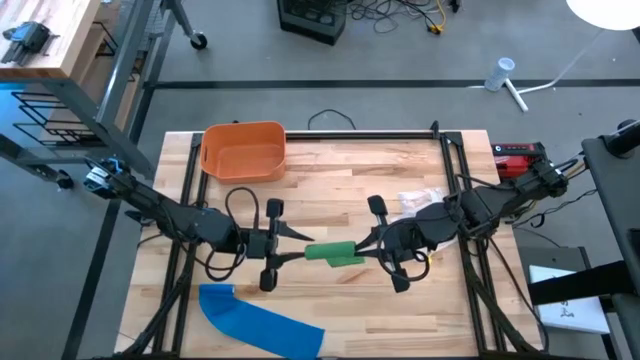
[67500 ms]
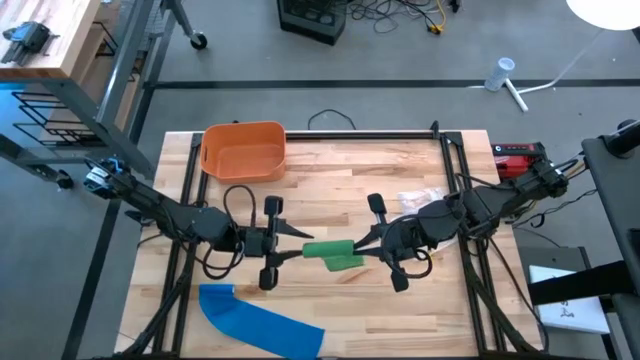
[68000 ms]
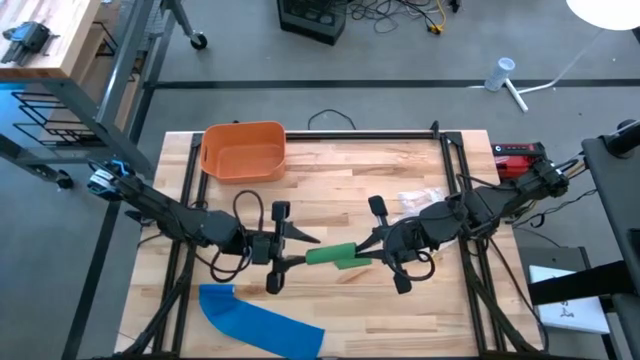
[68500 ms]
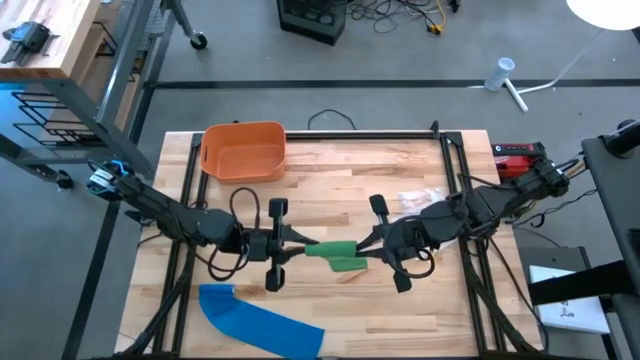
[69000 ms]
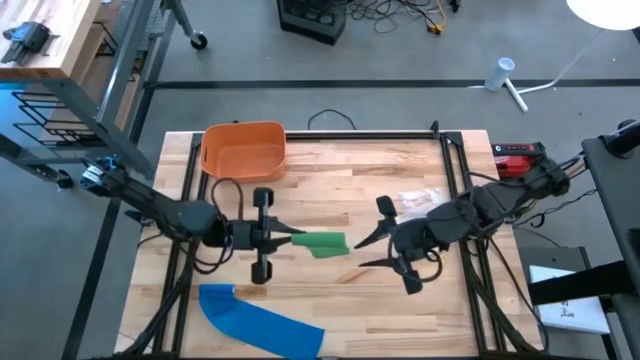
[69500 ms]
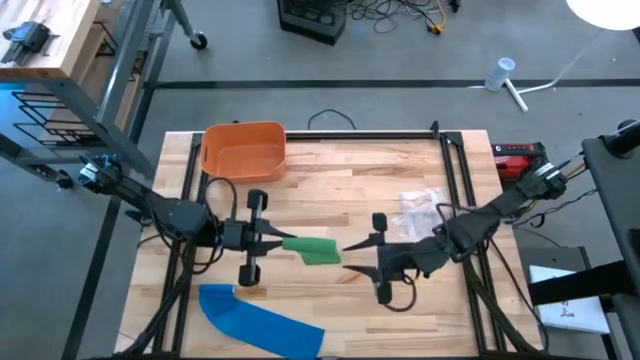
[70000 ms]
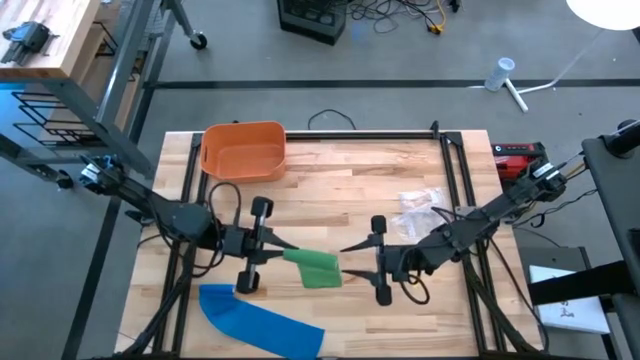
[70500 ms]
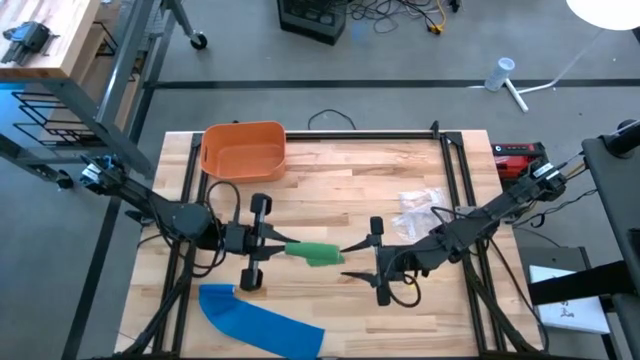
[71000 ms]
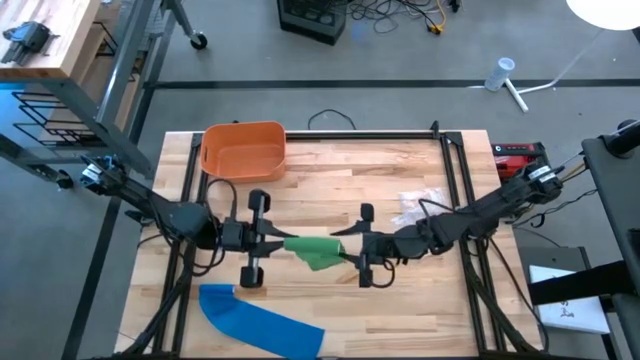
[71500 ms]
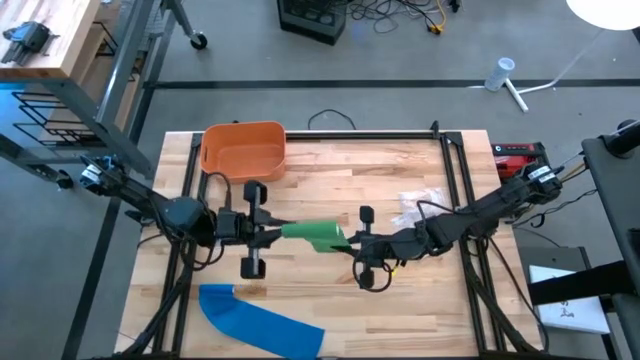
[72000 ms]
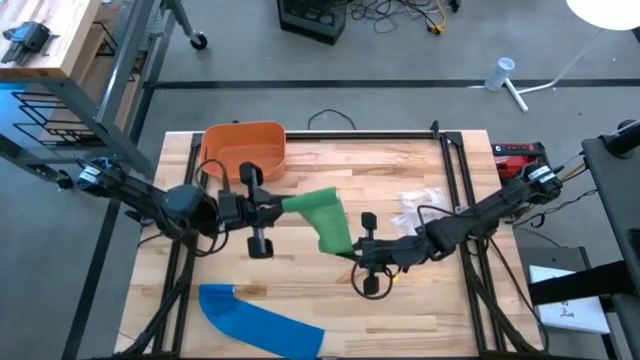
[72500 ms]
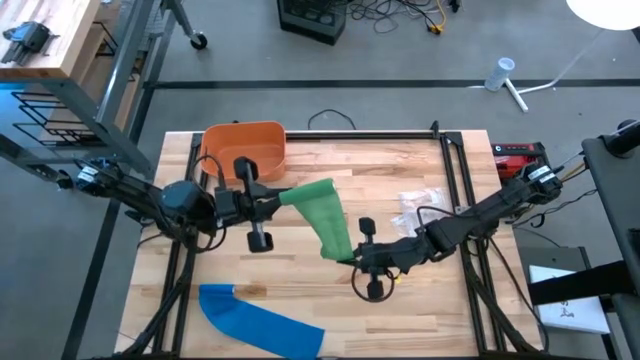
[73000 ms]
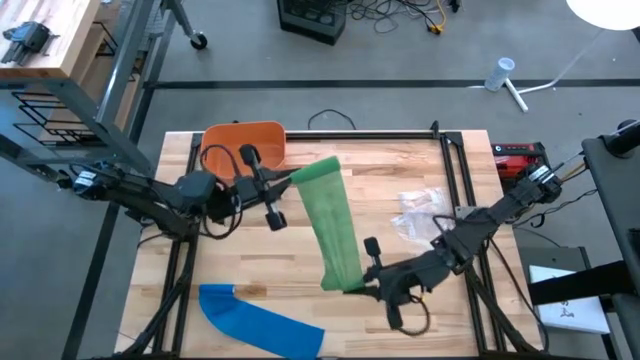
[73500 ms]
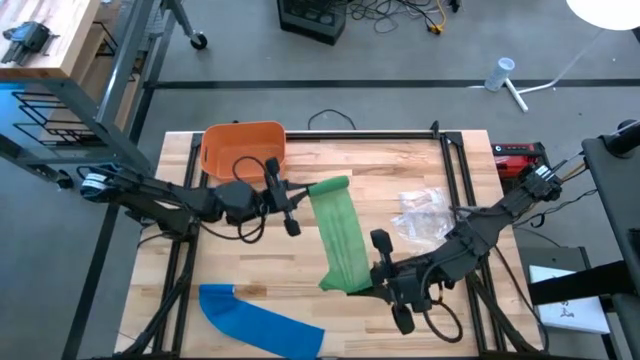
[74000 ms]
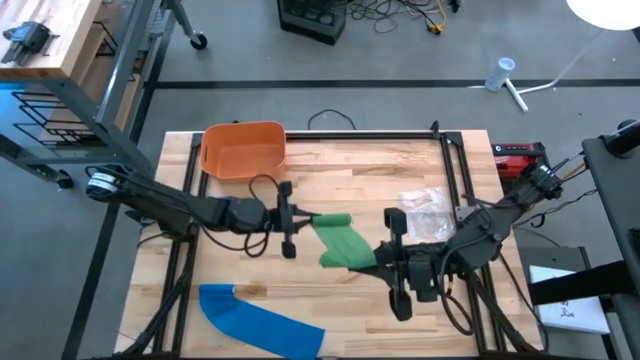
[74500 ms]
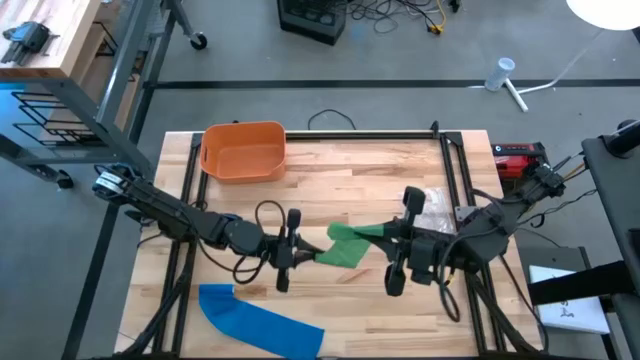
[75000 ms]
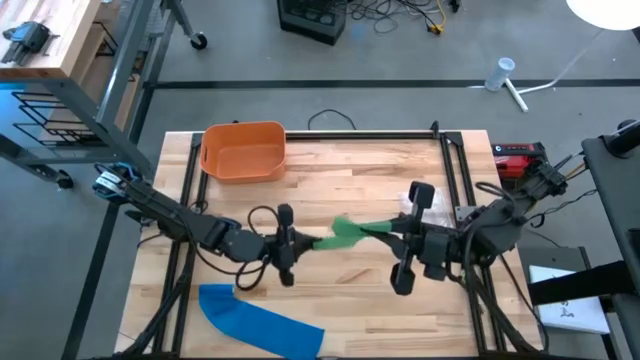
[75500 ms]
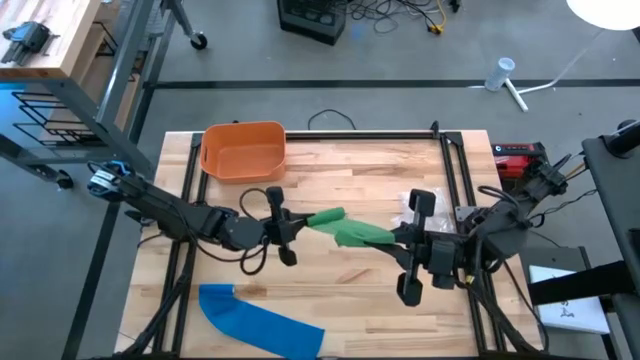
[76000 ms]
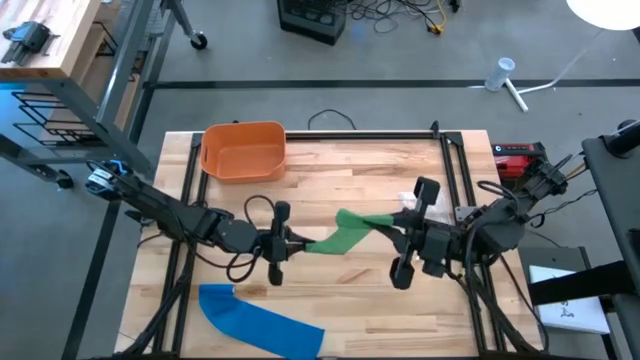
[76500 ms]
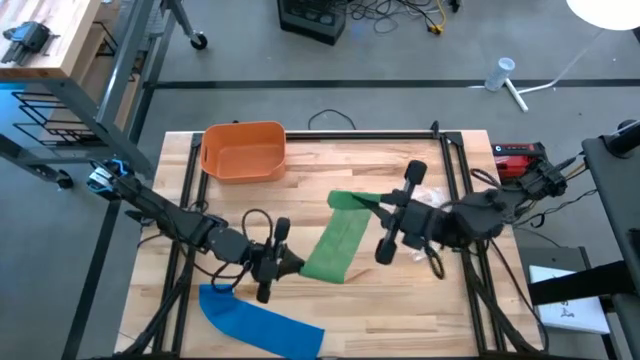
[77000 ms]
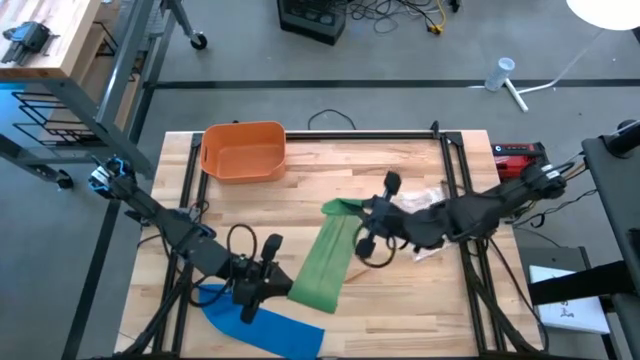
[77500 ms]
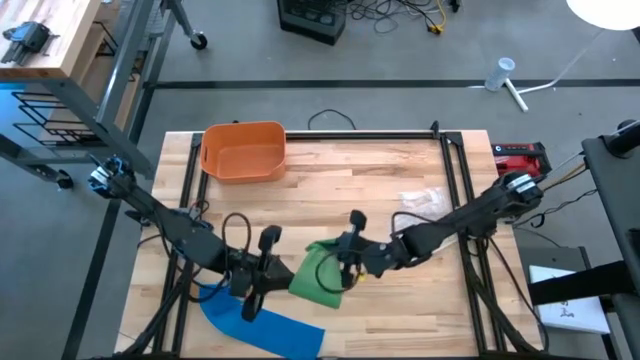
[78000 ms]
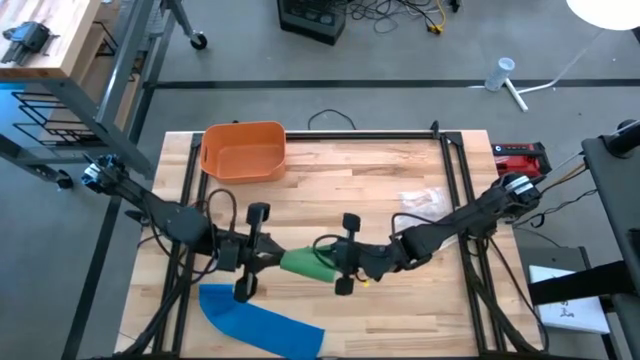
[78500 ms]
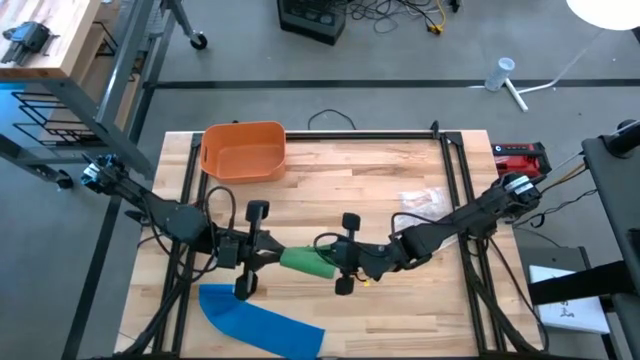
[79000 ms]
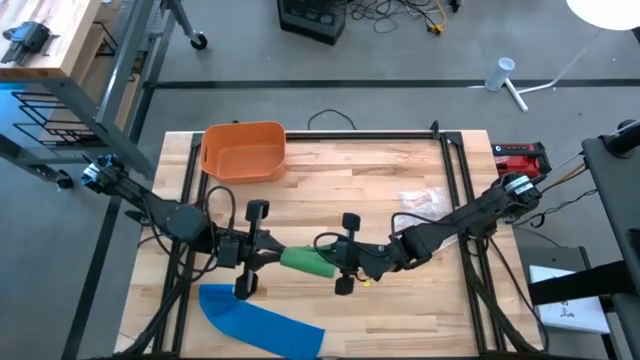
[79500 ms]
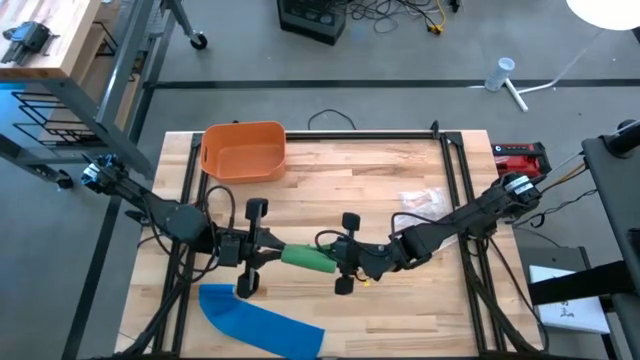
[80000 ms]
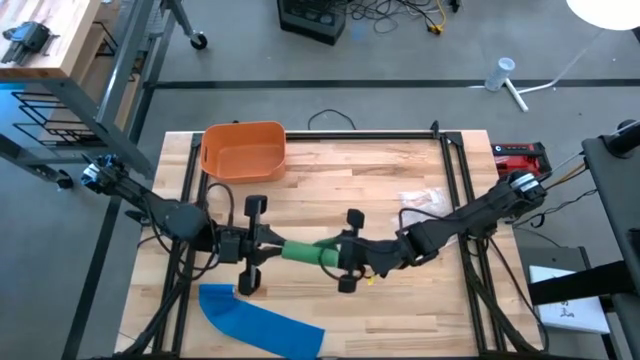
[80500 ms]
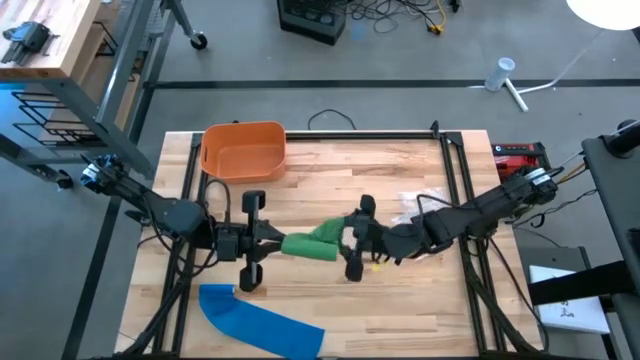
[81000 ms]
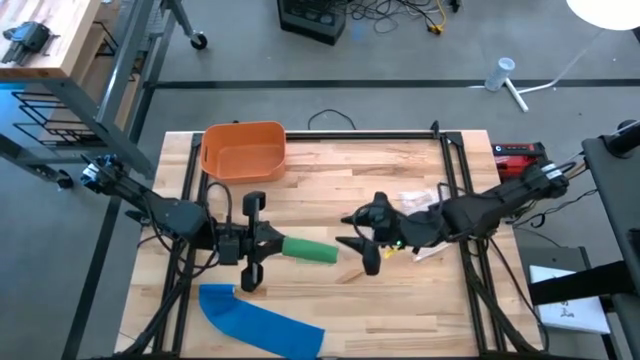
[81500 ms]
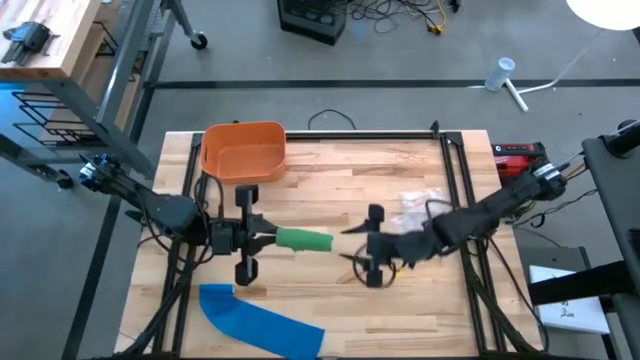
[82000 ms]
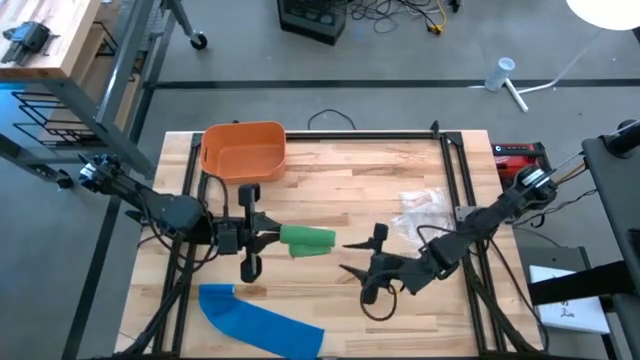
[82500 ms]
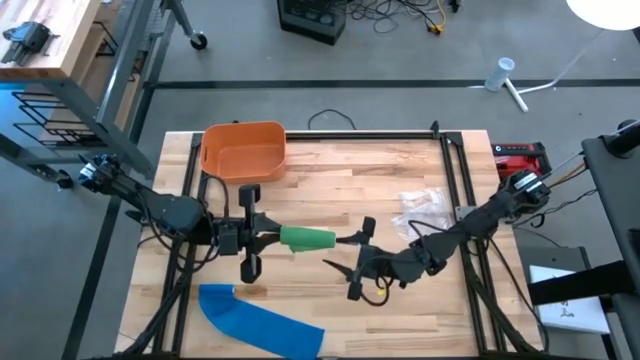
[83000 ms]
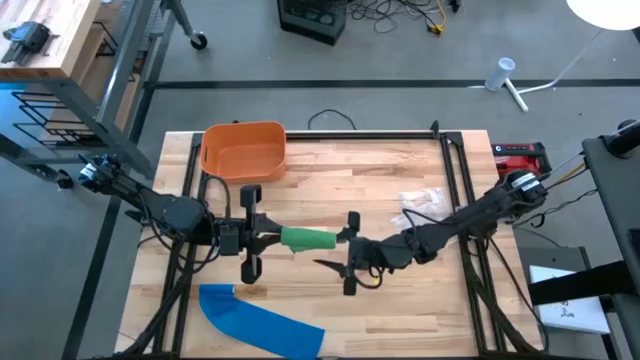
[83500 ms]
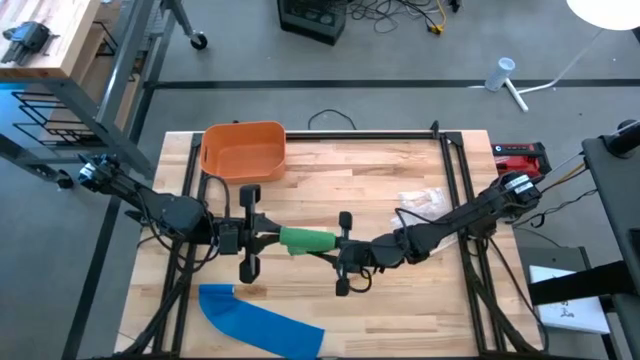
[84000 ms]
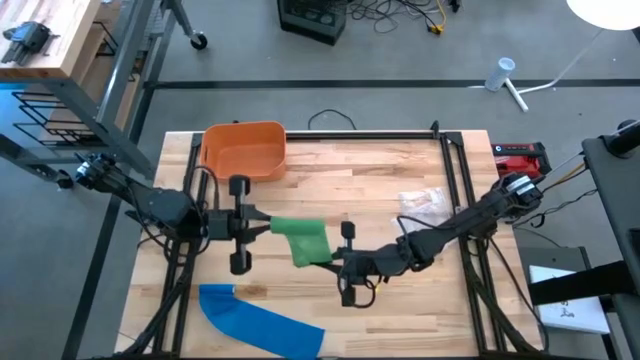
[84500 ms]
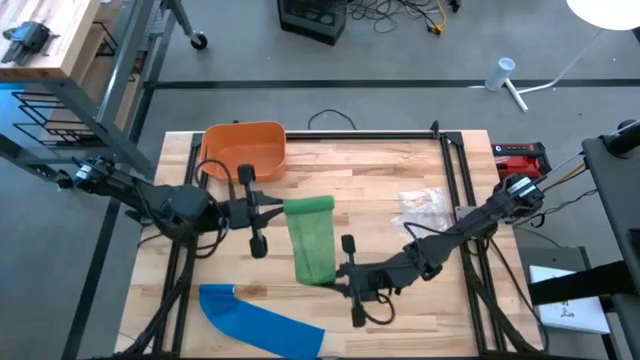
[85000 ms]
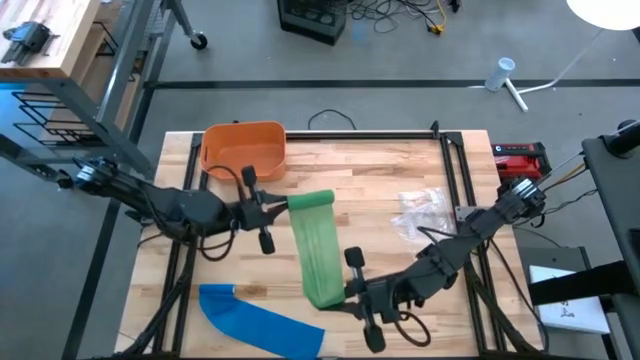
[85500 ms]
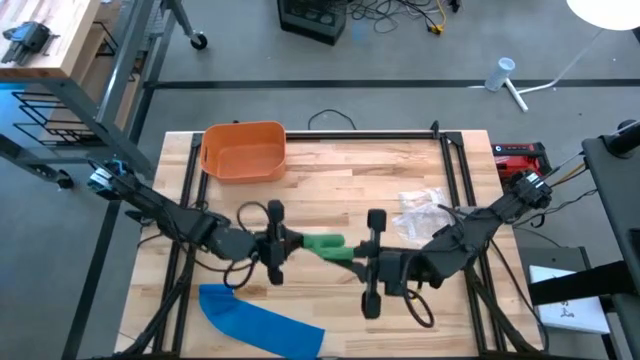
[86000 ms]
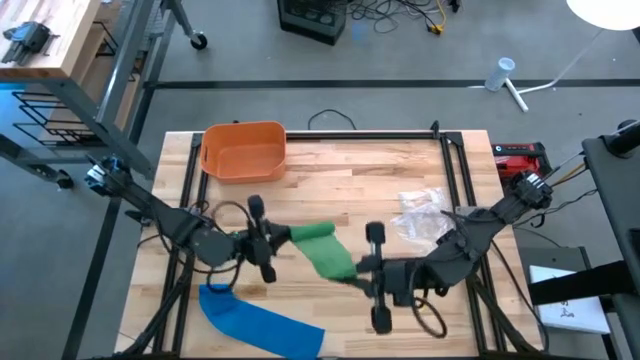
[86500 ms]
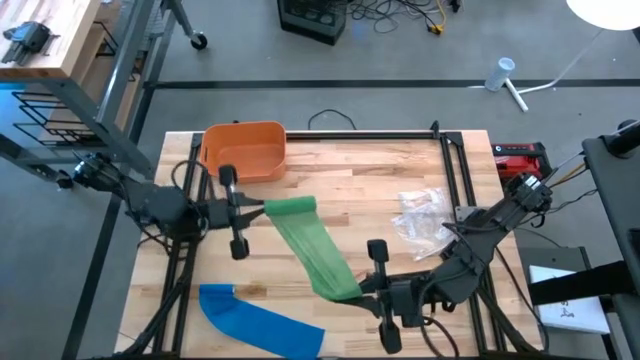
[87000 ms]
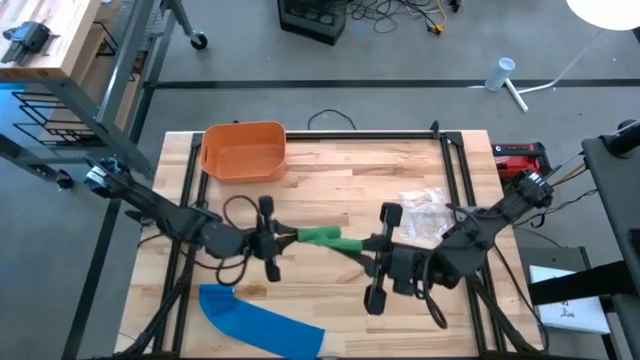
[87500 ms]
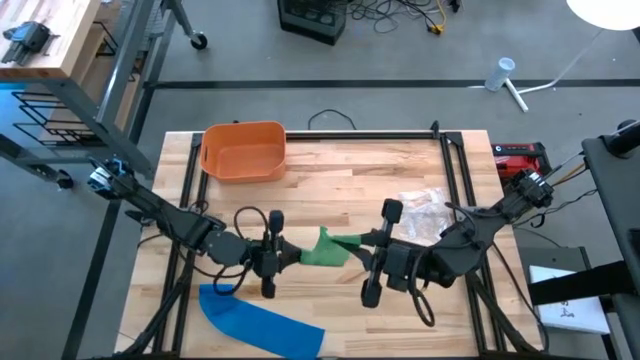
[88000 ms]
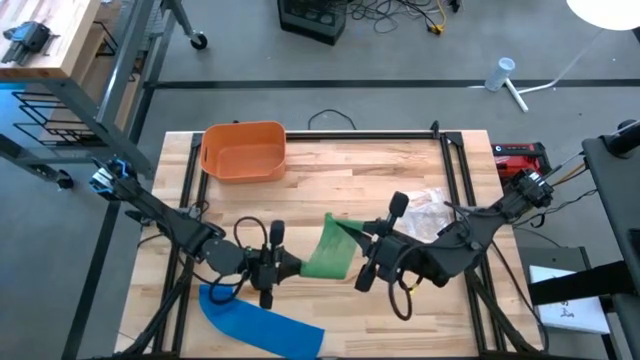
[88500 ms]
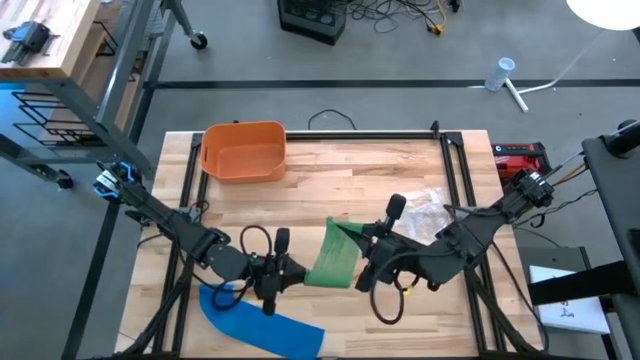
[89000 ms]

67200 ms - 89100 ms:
Task: Roll bandage
Roll the green bandage
